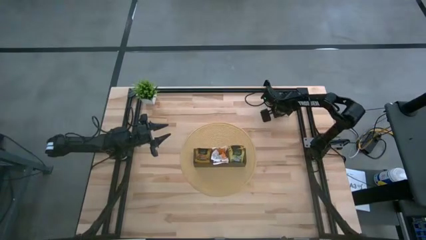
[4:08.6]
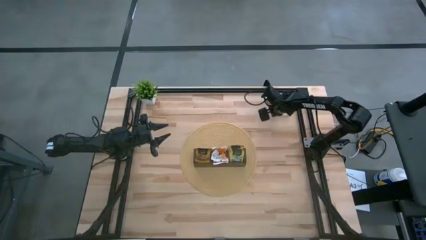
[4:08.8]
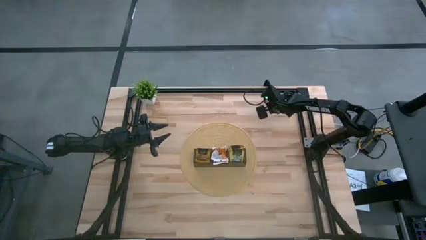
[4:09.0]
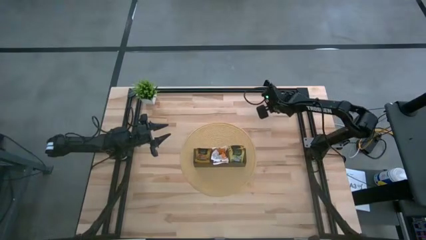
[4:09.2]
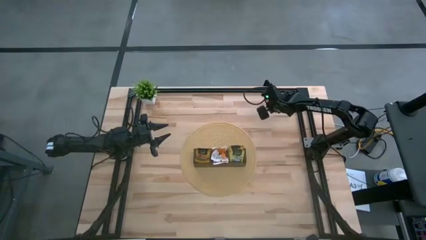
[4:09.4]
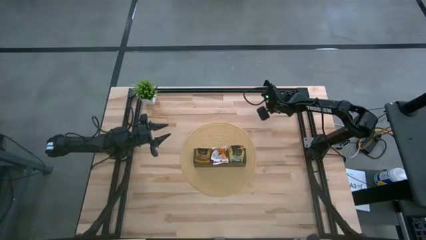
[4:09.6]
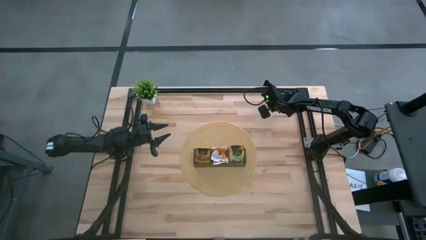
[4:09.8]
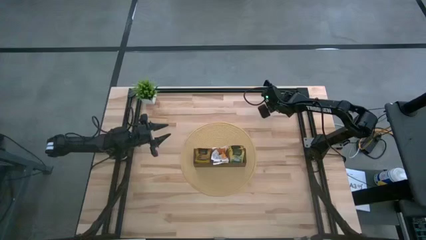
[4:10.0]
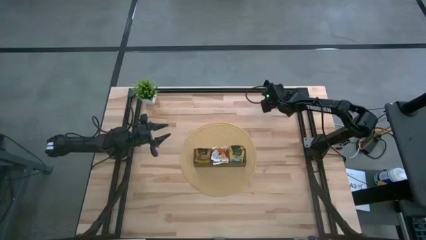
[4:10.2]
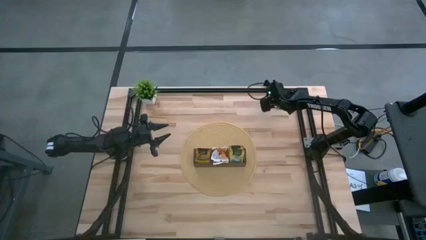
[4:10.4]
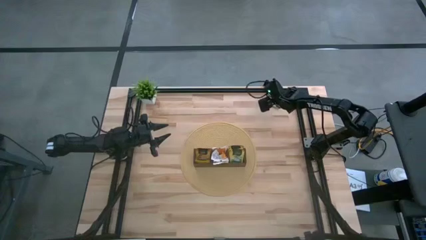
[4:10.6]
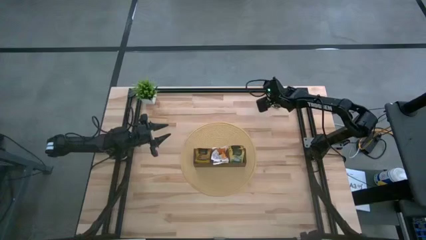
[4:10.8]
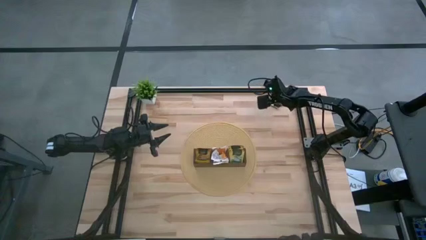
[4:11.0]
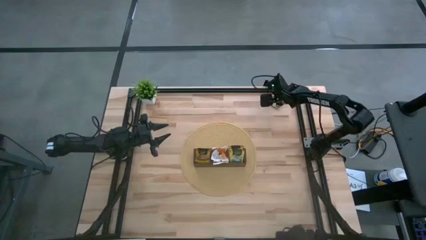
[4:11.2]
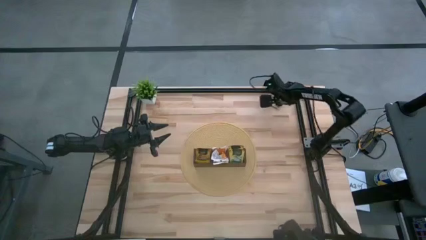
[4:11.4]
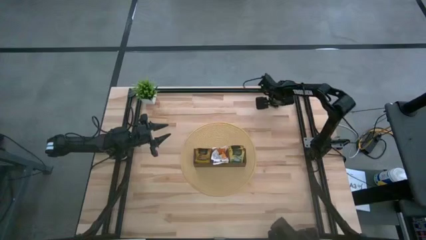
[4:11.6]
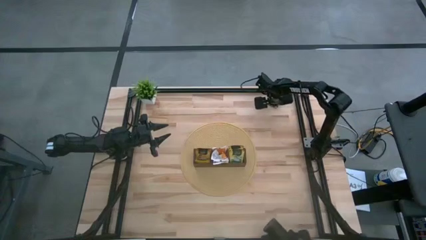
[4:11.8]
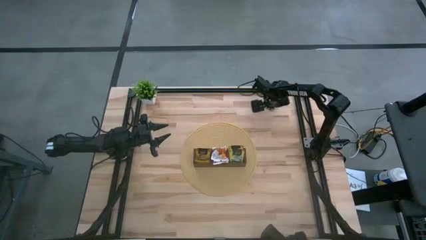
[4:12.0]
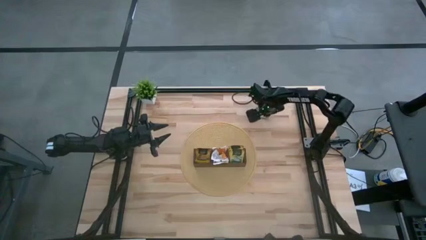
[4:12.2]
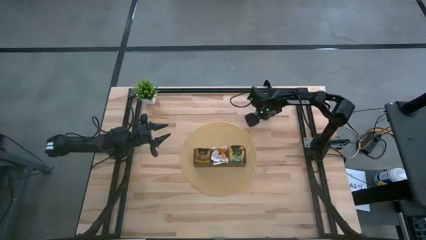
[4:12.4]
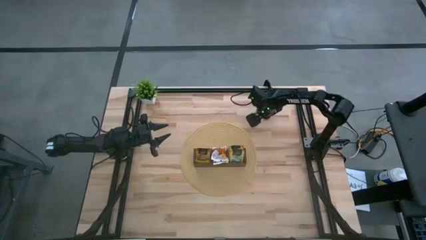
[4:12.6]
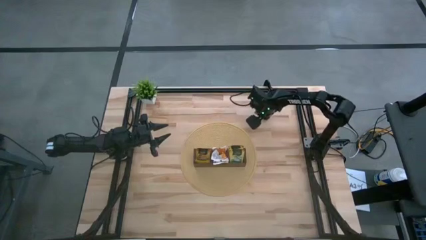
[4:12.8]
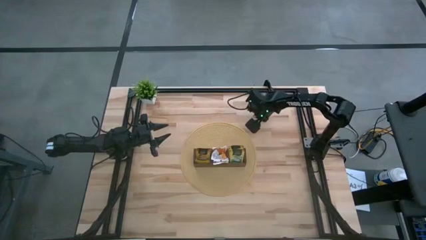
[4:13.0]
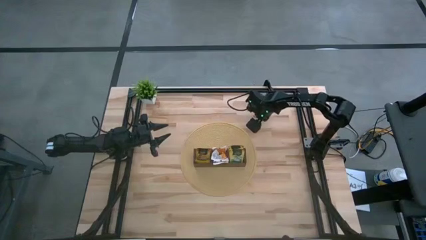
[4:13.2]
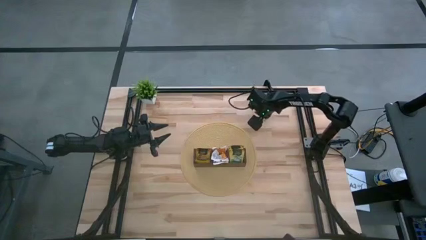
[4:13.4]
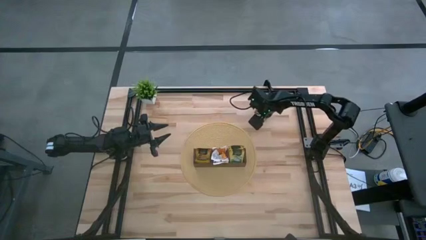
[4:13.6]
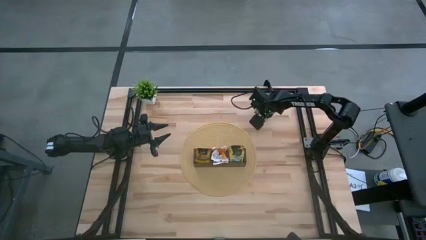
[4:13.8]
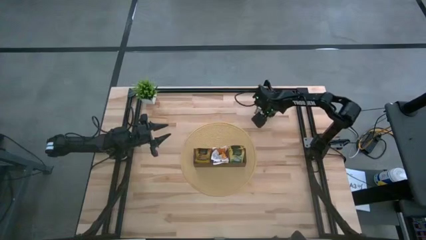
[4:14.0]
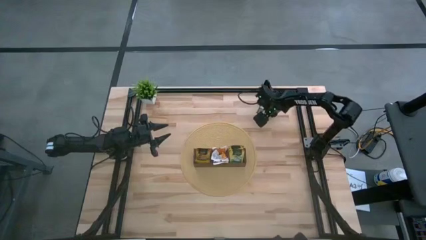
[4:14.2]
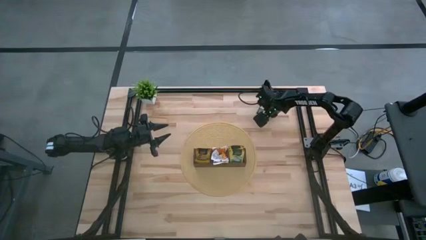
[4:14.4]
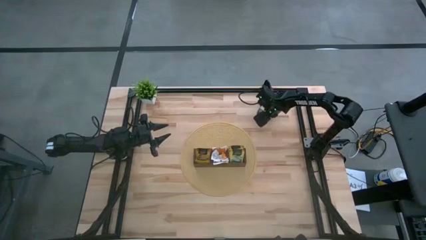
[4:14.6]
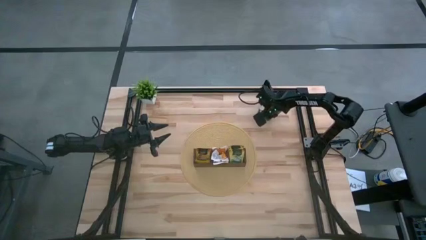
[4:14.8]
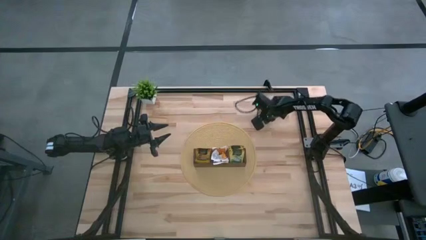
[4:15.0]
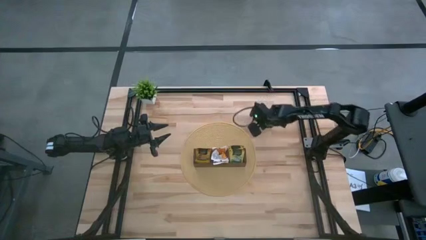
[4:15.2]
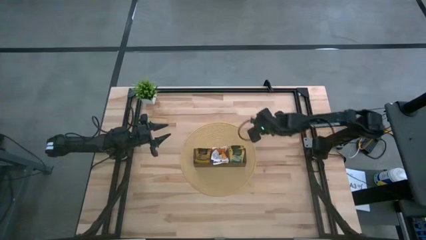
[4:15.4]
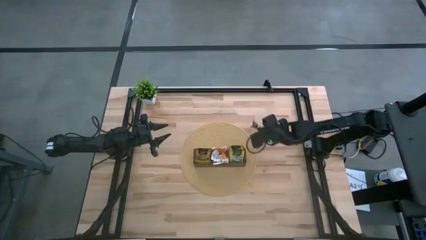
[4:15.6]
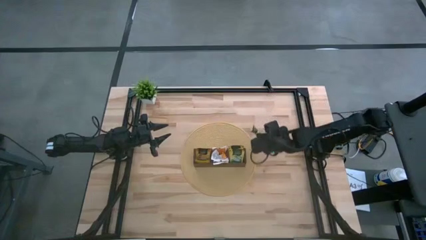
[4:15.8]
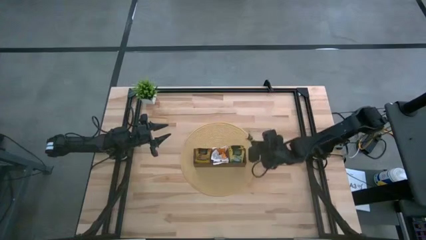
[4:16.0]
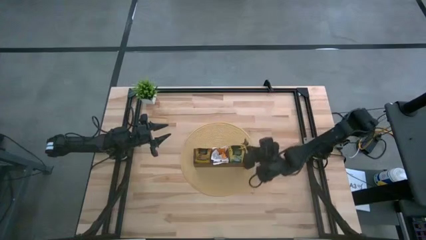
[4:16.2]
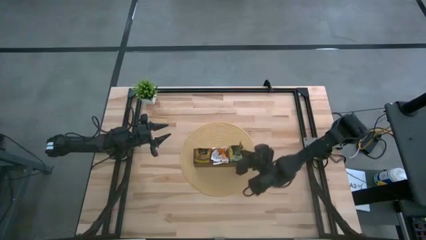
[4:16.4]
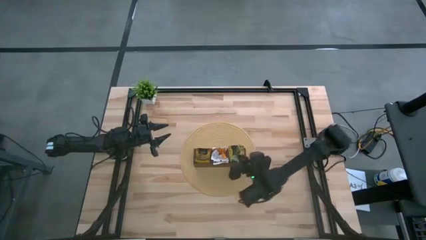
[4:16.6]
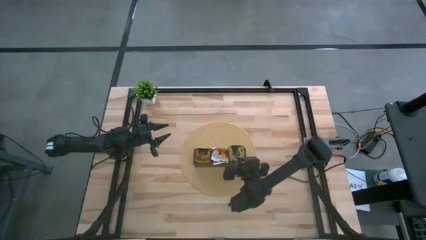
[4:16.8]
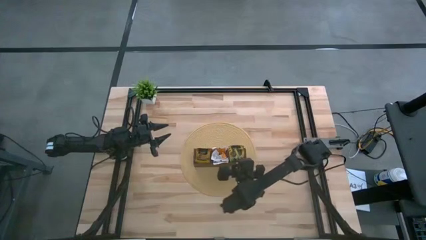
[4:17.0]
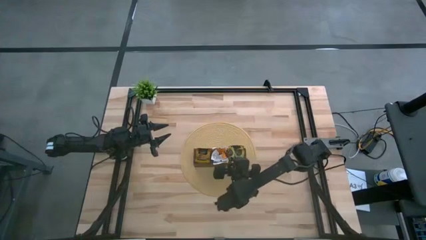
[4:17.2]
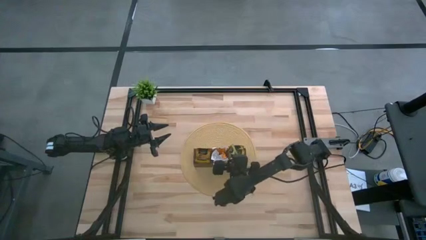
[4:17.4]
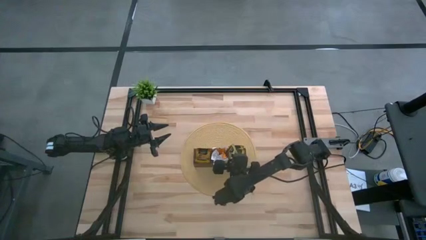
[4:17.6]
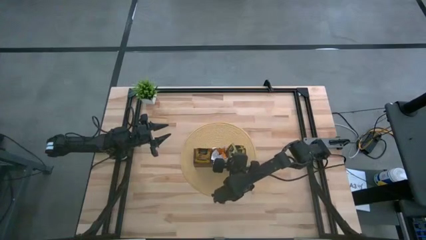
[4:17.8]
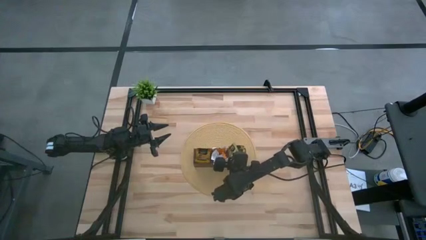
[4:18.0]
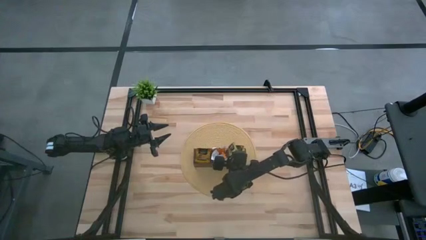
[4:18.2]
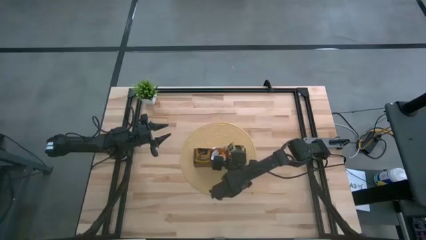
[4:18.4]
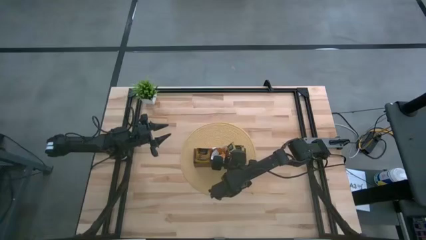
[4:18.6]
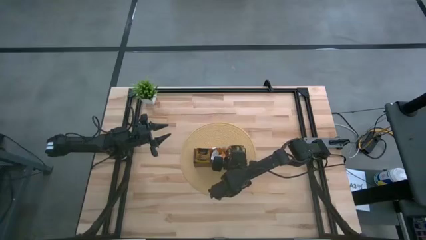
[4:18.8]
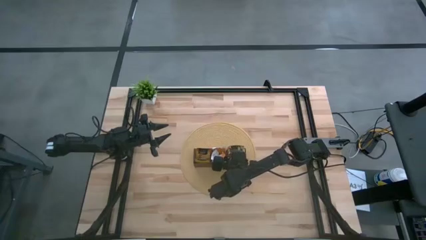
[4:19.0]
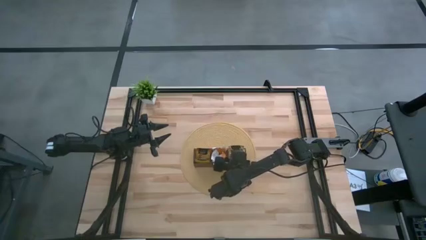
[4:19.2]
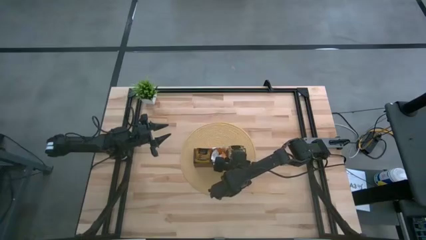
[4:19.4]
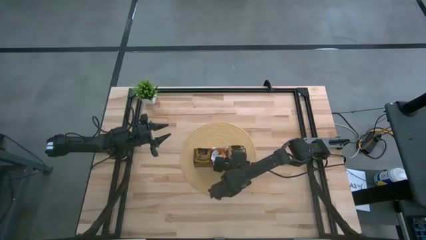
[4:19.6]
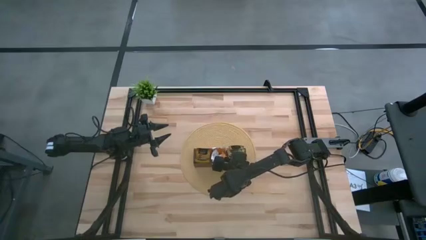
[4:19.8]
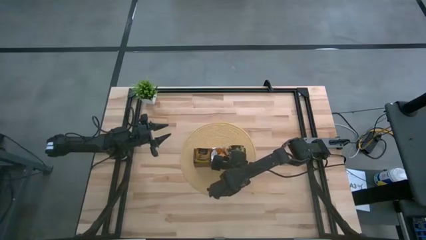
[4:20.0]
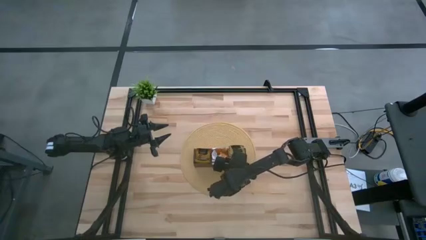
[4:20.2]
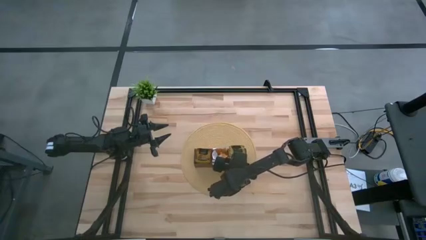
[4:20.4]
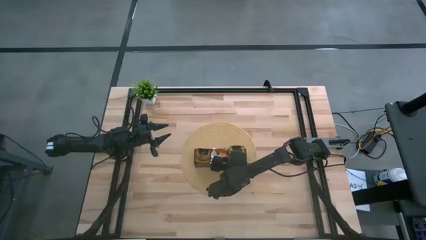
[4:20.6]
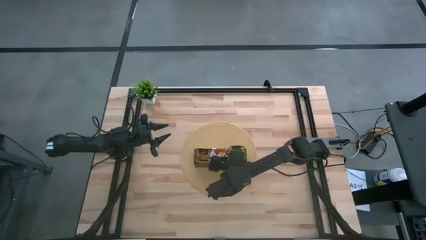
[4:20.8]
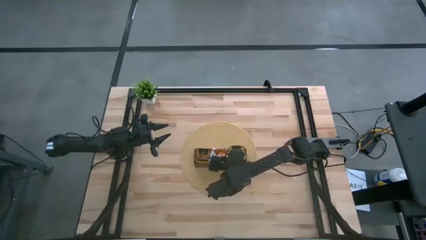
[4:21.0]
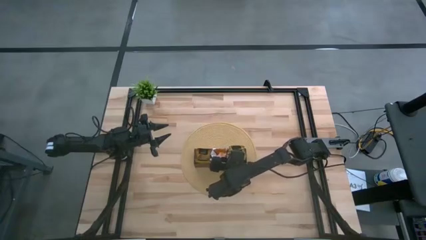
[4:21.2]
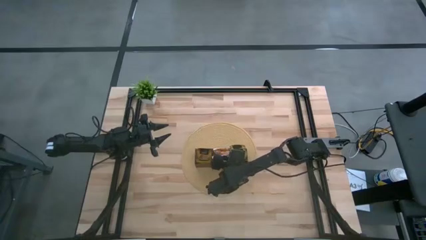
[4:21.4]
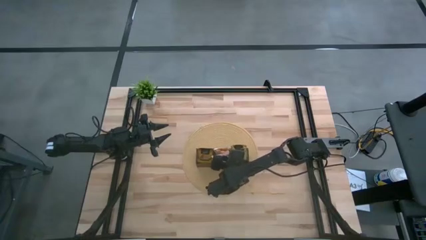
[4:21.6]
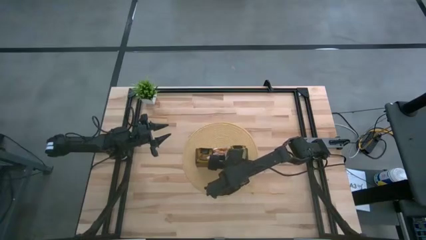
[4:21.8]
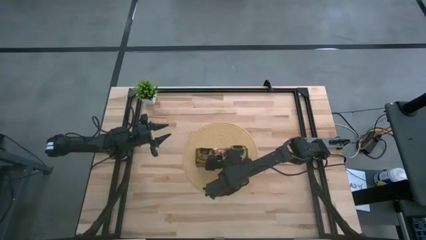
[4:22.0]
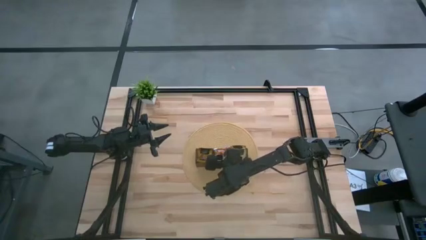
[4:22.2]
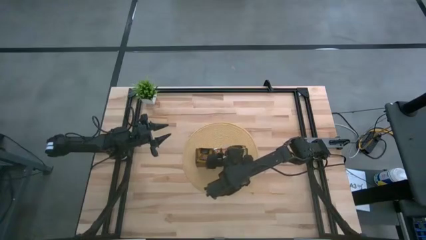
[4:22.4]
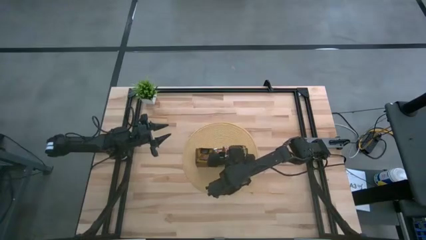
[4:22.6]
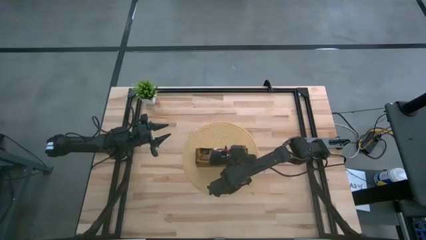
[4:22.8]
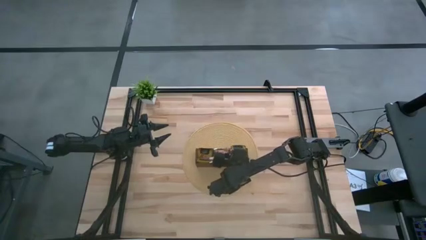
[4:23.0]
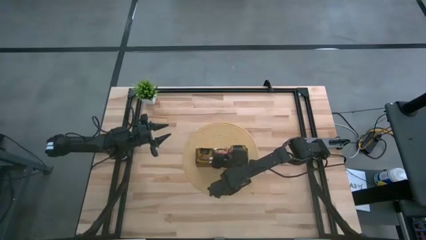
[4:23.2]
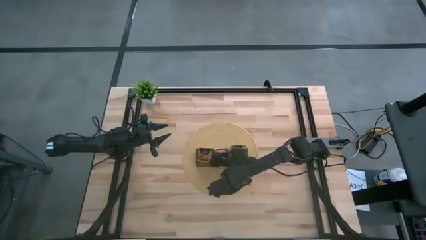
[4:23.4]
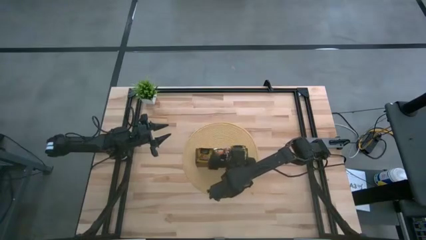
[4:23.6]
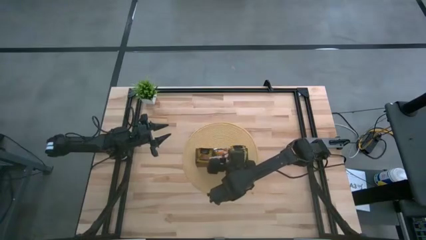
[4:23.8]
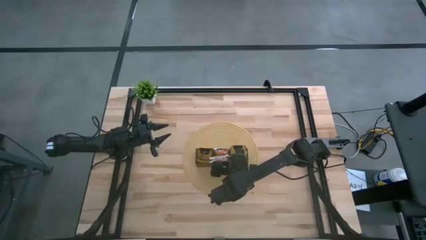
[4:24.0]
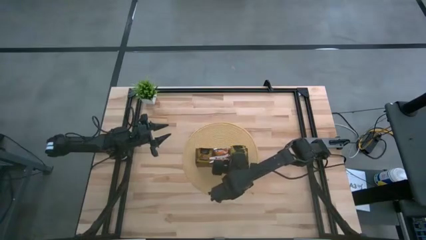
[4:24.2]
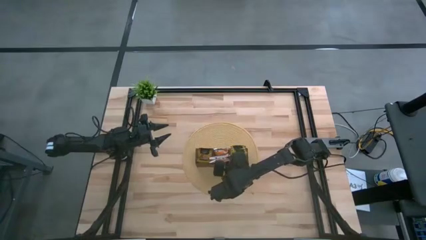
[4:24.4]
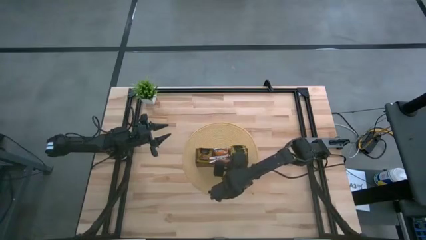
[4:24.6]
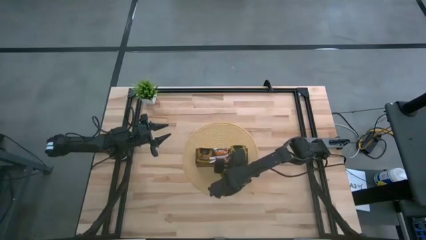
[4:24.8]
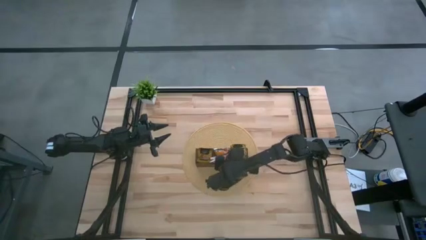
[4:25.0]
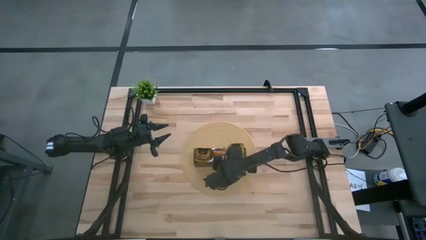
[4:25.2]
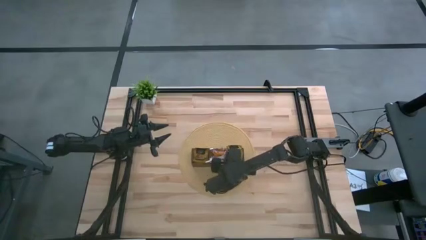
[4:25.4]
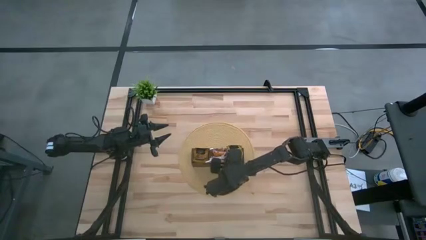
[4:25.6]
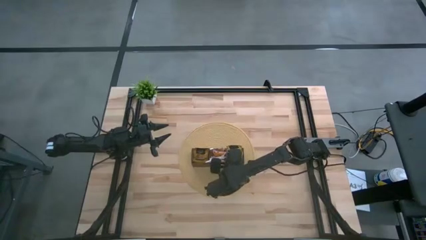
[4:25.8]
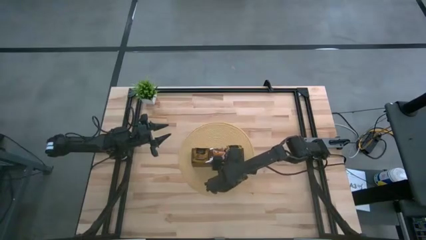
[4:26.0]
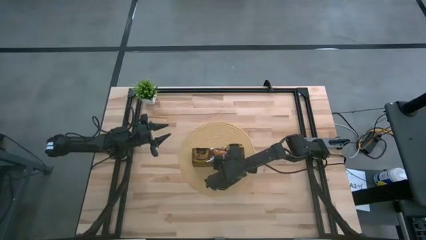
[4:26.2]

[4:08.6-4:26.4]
Task: Pick & Place Tea
Put the lemon tea sachet into the right section of the wooden organizer
